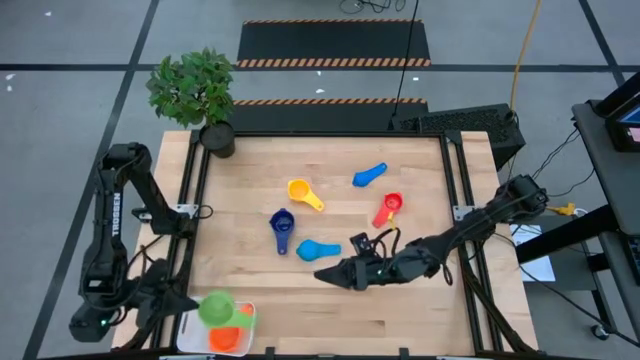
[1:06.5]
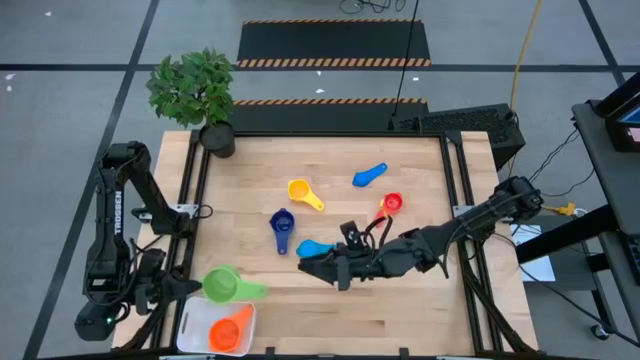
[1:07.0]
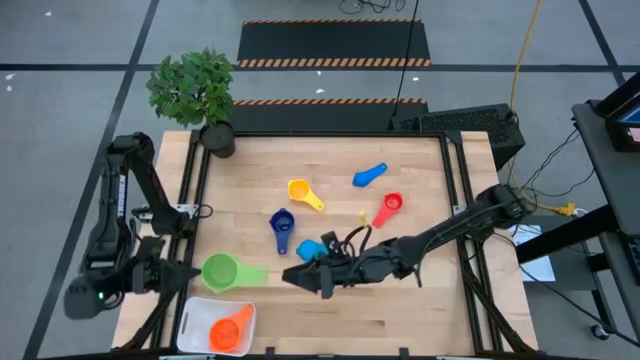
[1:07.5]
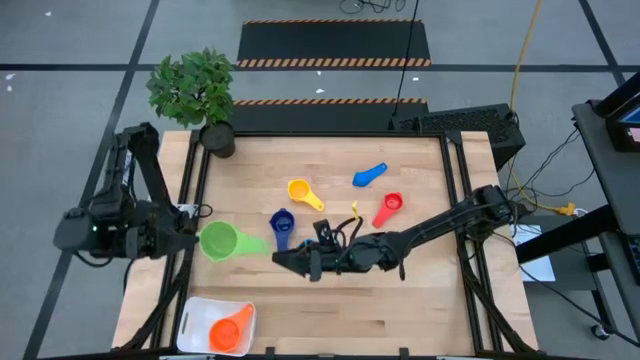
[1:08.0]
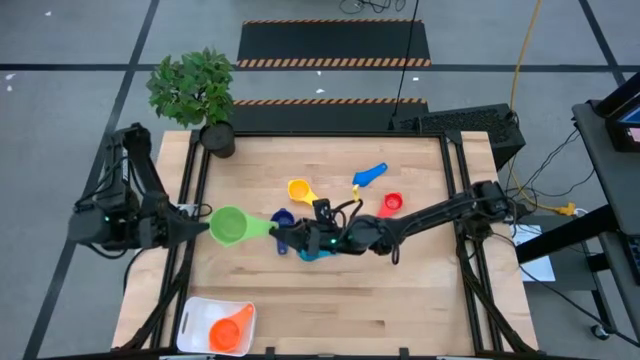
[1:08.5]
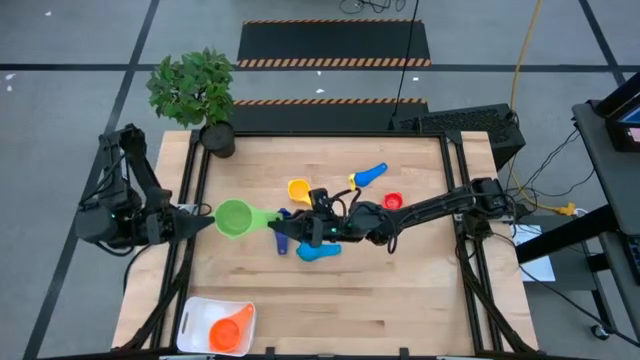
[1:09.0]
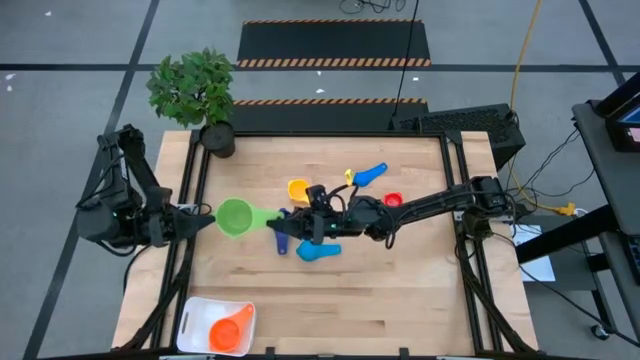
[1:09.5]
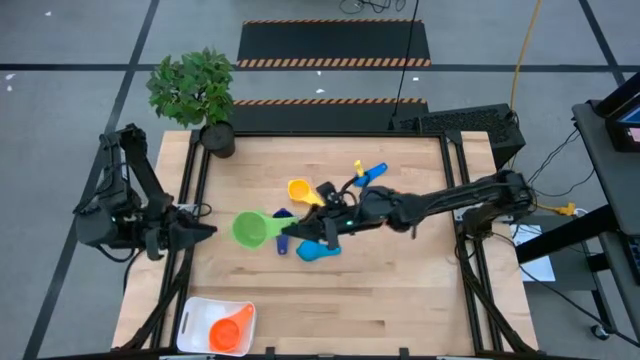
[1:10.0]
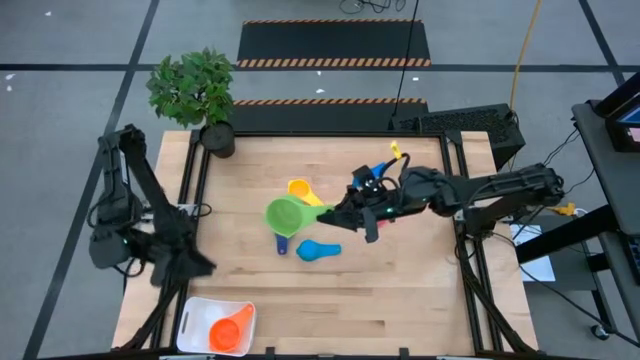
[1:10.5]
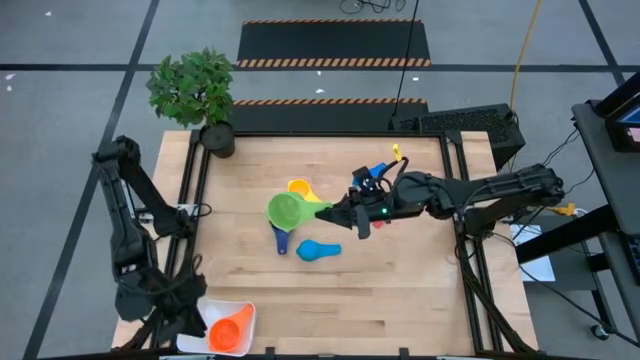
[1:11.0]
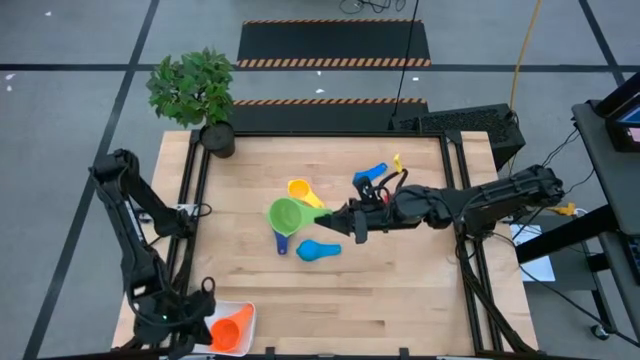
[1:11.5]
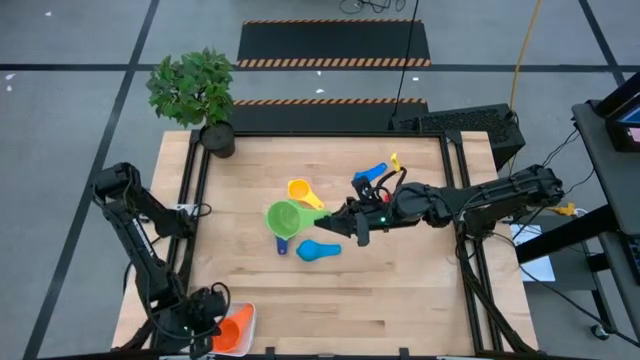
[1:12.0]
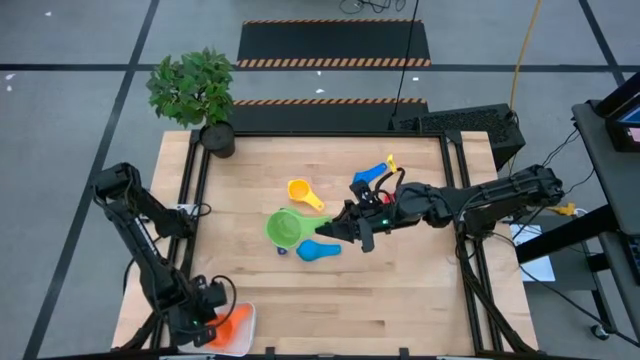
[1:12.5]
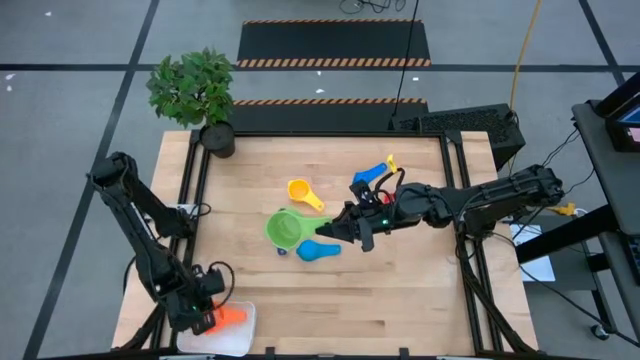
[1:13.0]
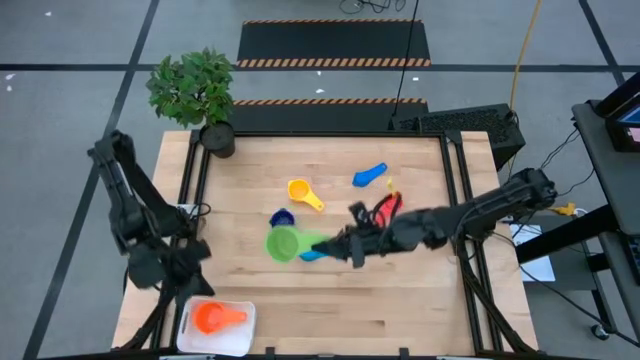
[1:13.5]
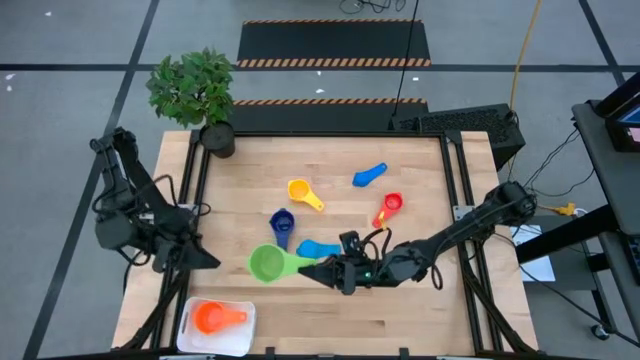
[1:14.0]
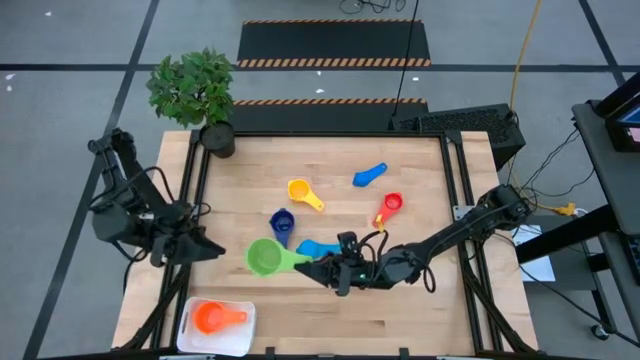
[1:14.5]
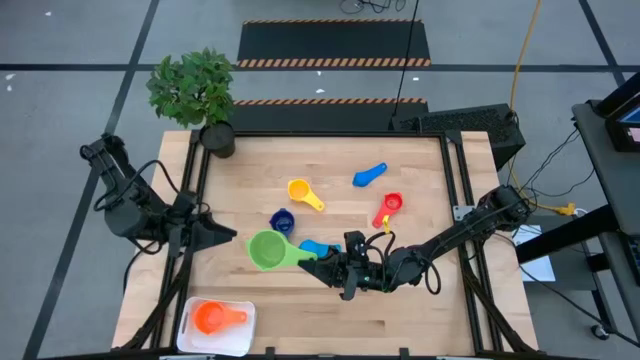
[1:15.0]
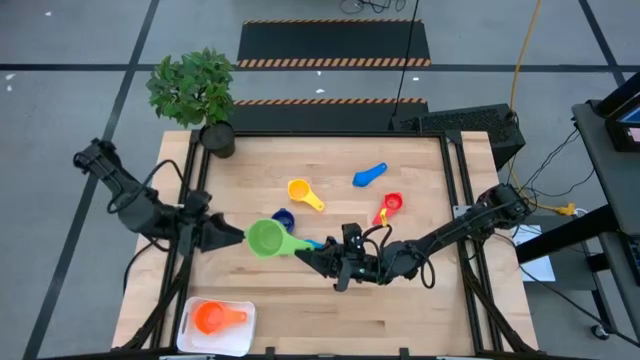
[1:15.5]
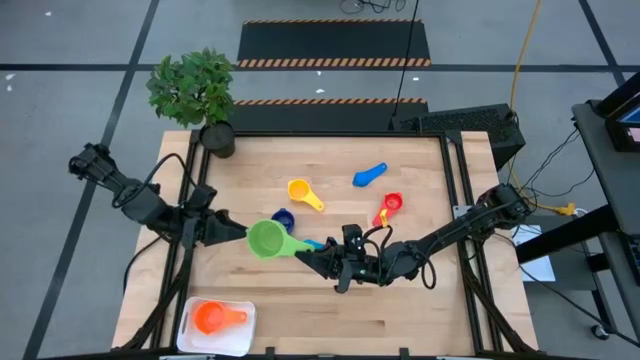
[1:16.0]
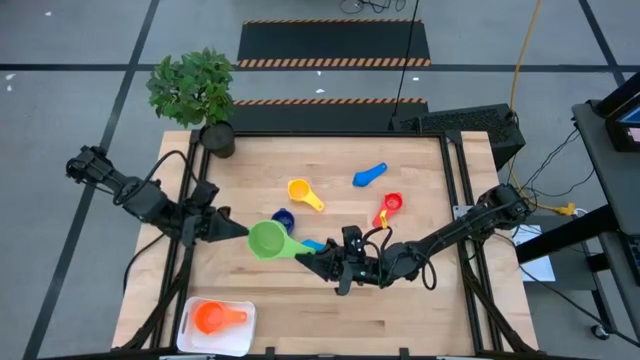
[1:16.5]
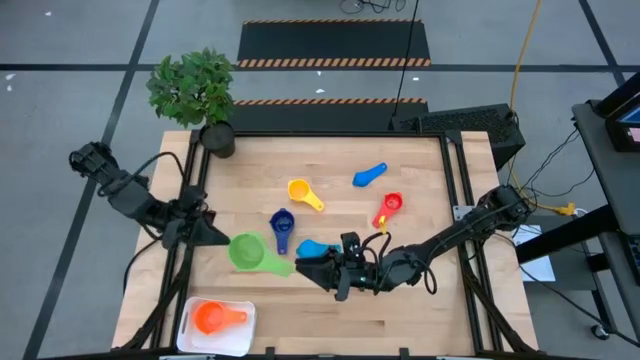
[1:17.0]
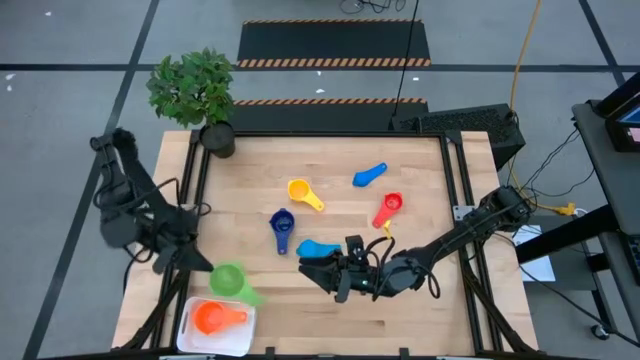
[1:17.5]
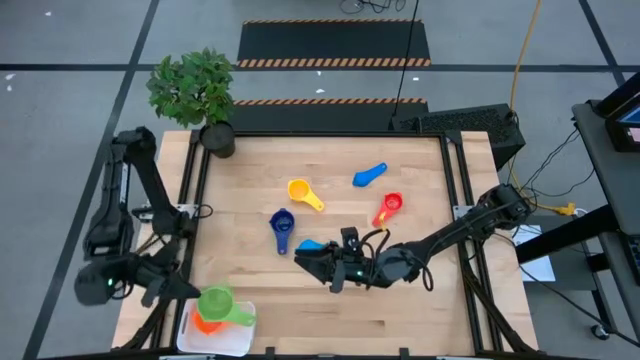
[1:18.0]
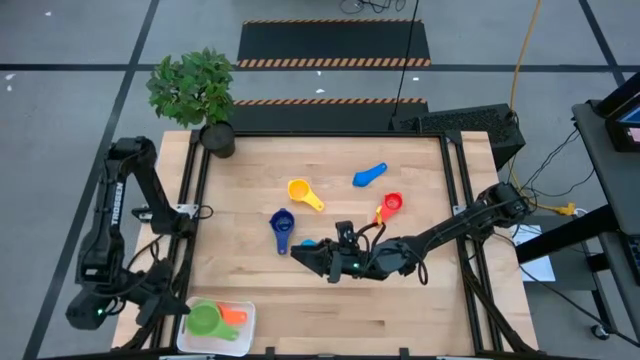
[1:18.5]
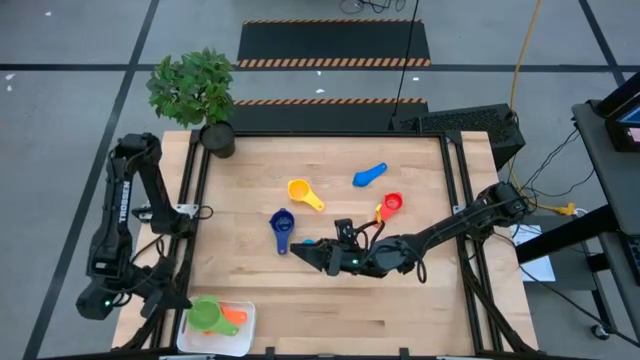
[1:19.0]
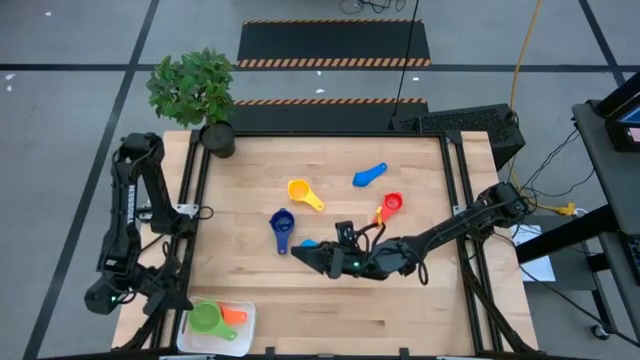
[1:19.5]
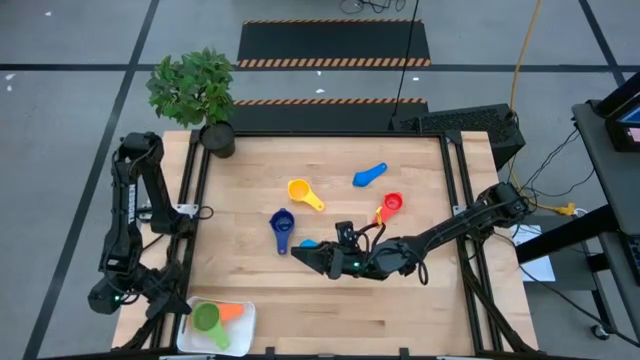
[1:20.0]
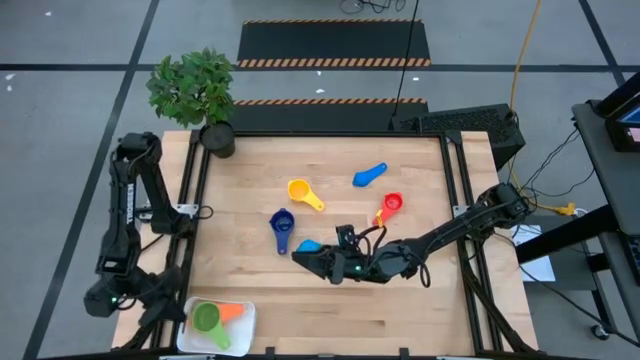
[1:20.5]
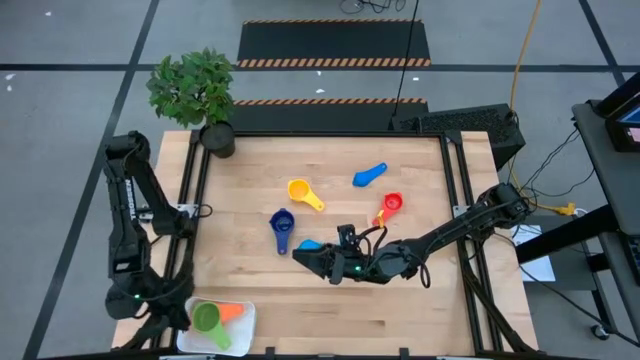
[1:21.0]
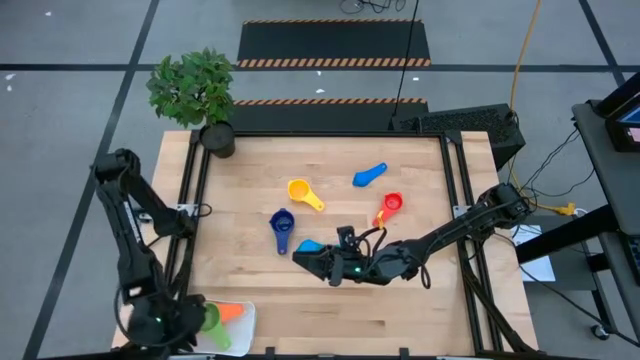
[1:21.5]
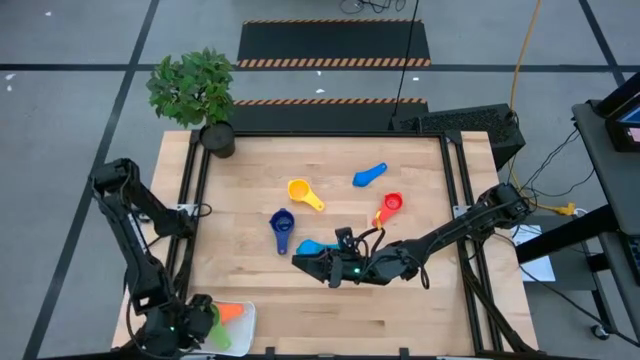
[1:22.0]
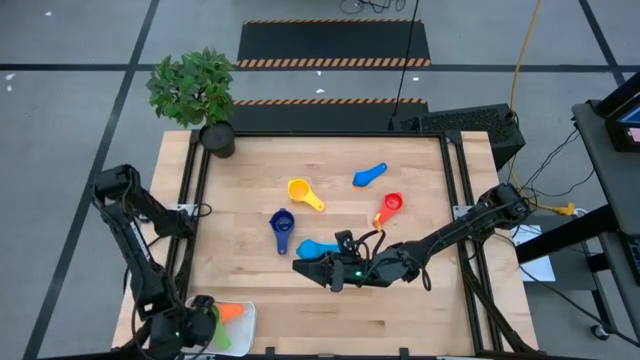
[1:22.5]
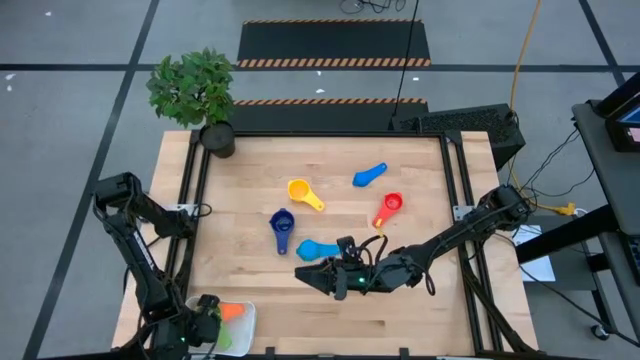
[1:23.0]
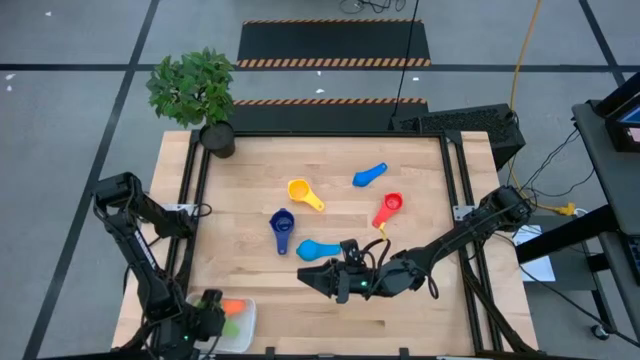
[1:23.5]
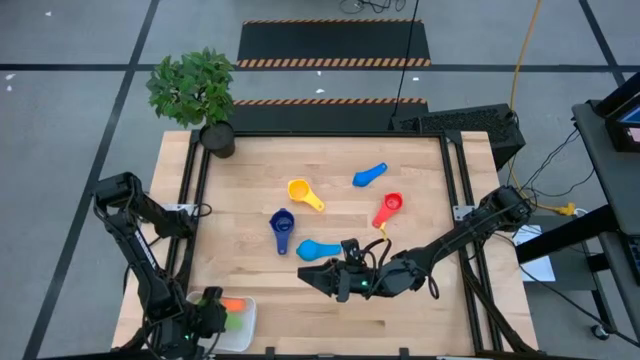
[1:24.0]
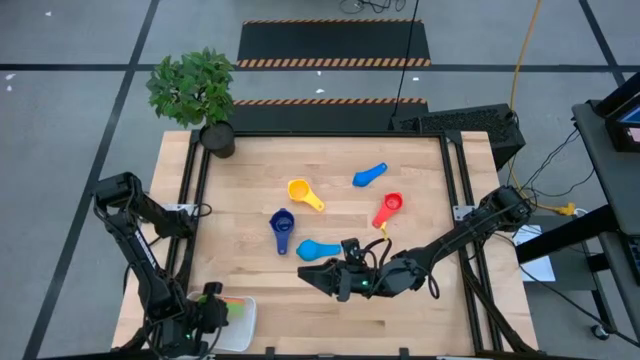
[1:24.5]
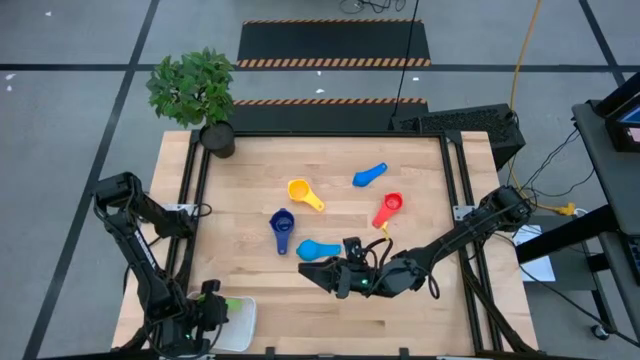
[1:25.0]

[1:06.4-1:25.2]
Task: Nest measuring cups in basket
Stack the green measuring cup on top of the orange measuring cup in the white bin

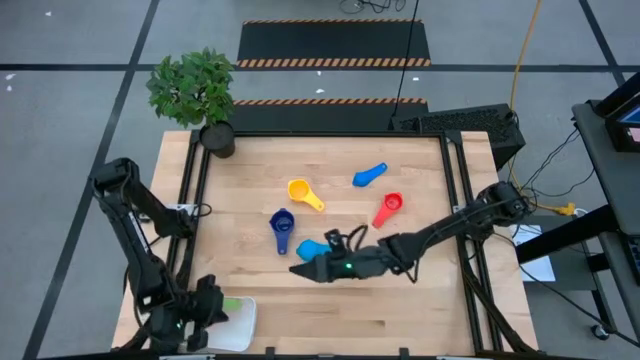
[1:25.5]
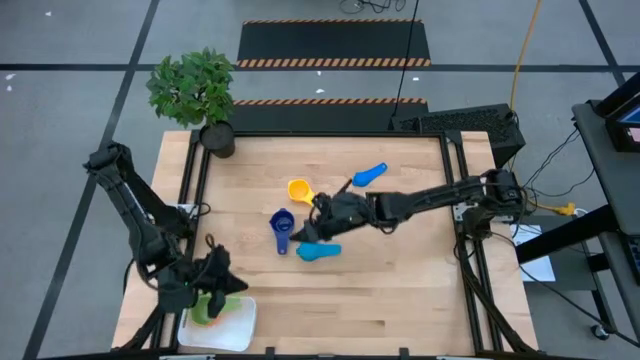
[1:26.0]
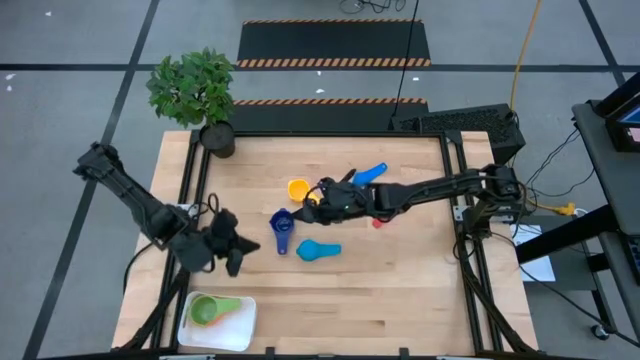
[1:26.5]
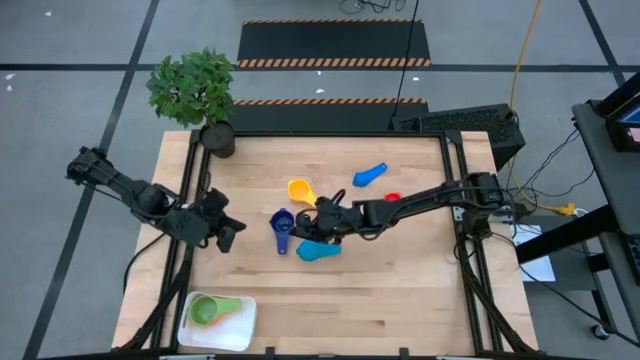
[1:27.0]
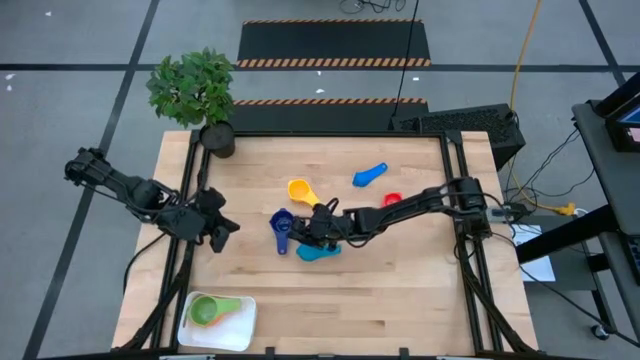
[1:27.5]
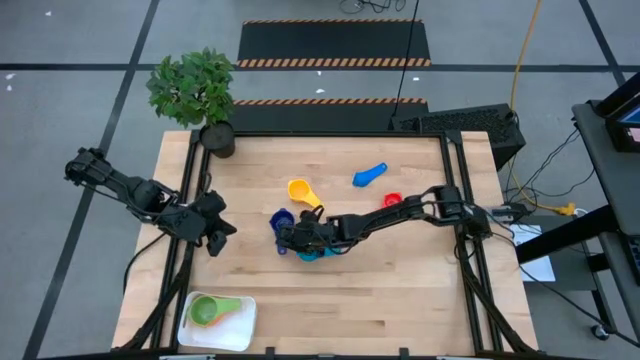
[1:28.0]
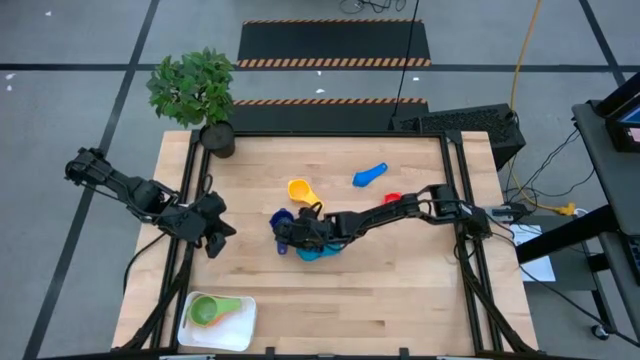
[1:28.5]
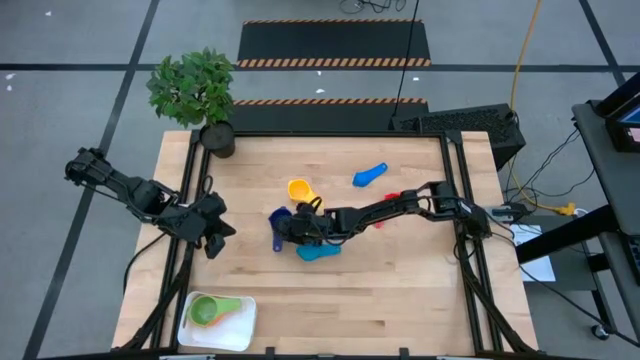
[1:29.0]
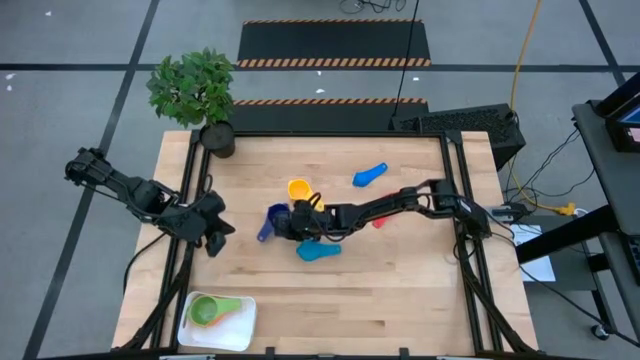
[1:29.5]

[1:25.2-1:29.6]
Stack the dark blue measuring cup on top of the green measuring cup in the white bin
